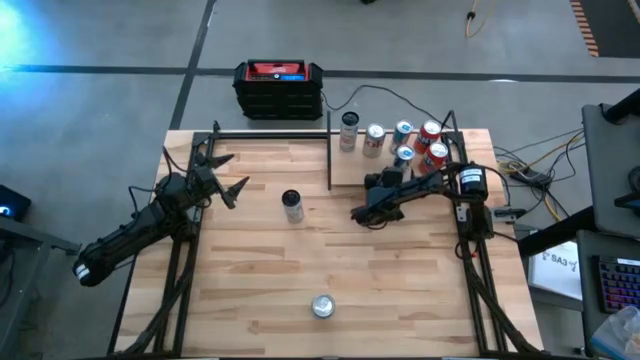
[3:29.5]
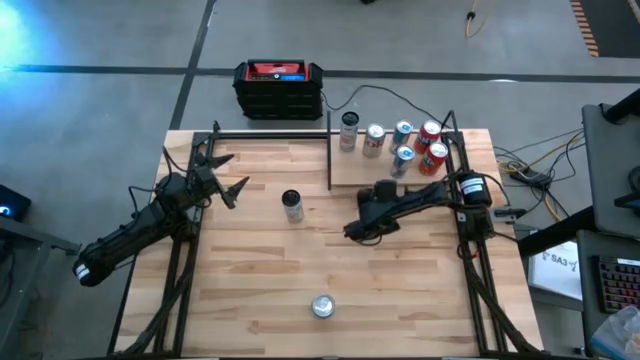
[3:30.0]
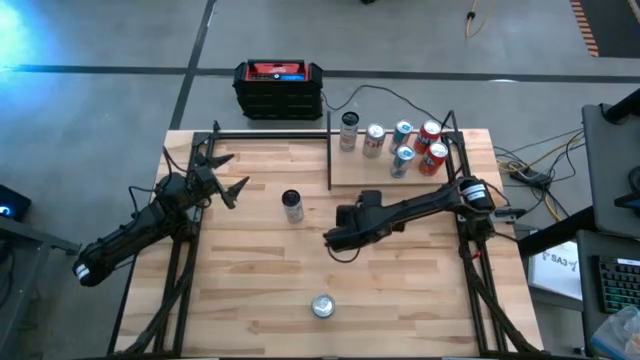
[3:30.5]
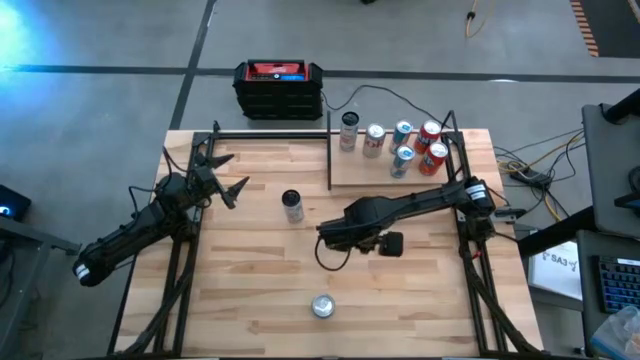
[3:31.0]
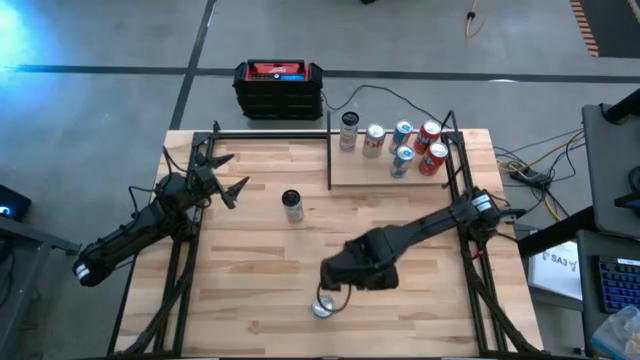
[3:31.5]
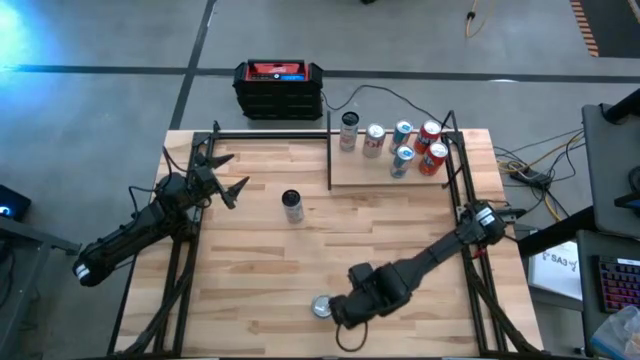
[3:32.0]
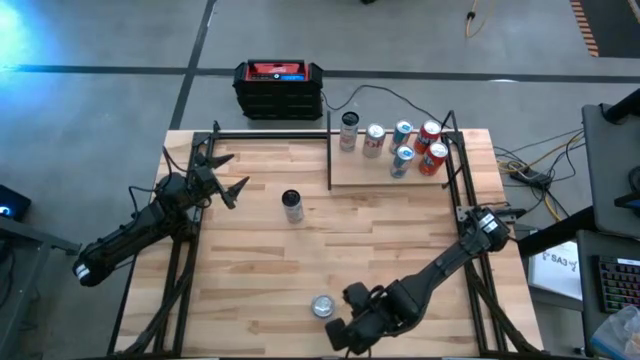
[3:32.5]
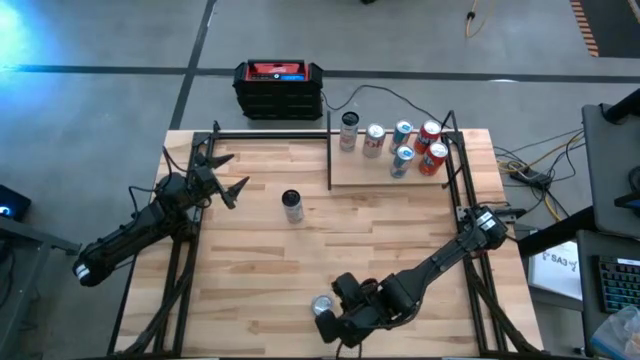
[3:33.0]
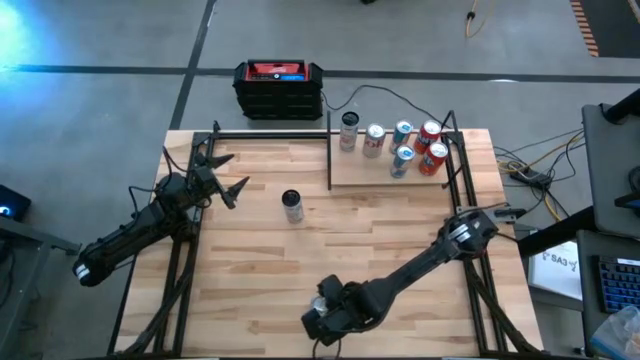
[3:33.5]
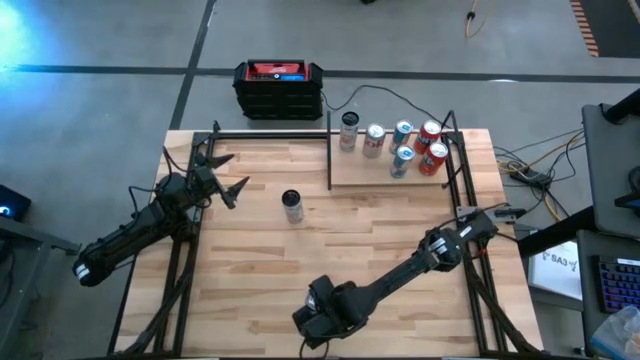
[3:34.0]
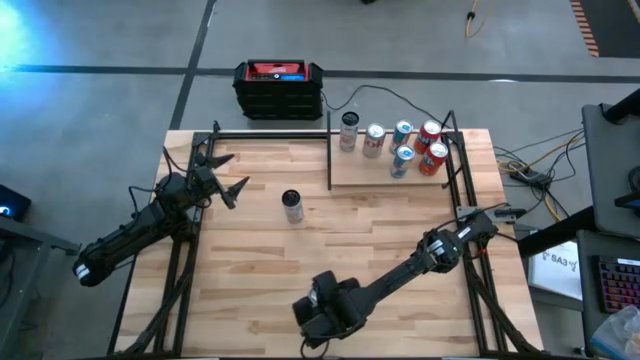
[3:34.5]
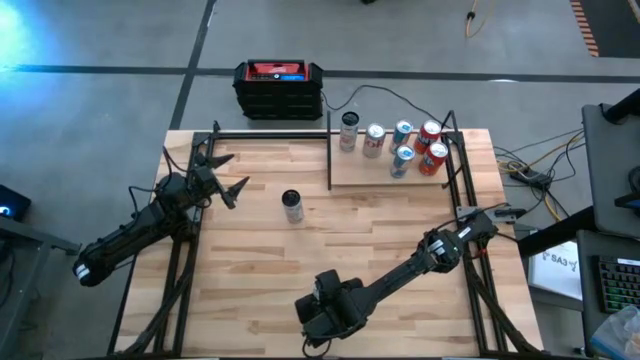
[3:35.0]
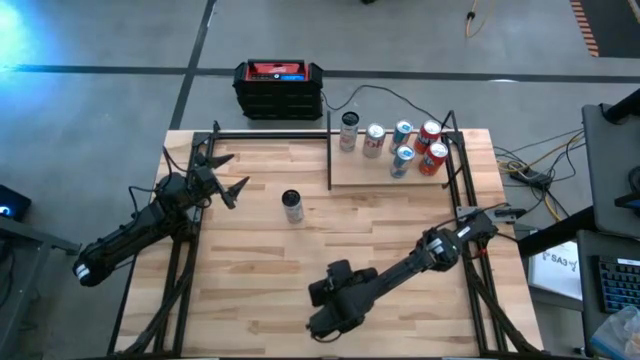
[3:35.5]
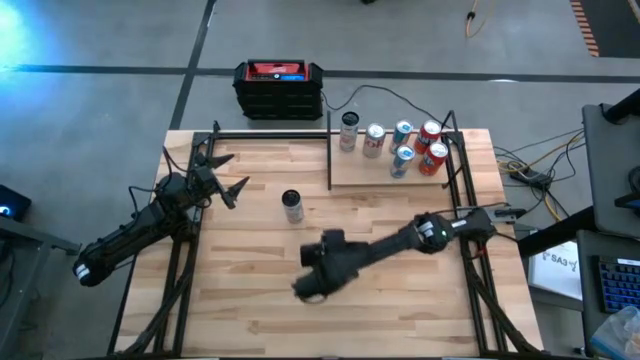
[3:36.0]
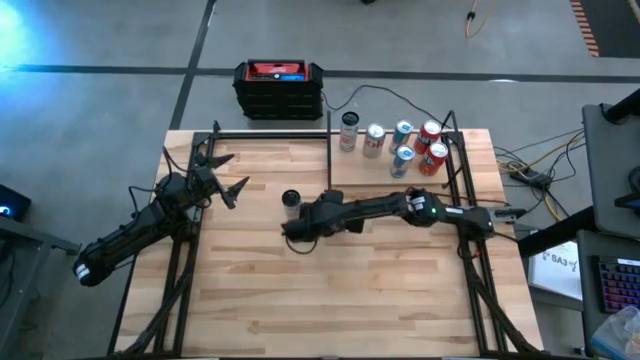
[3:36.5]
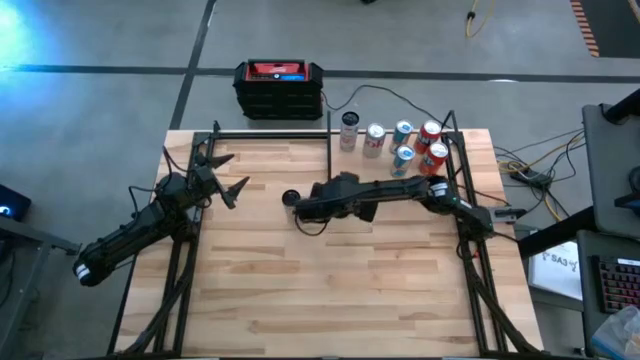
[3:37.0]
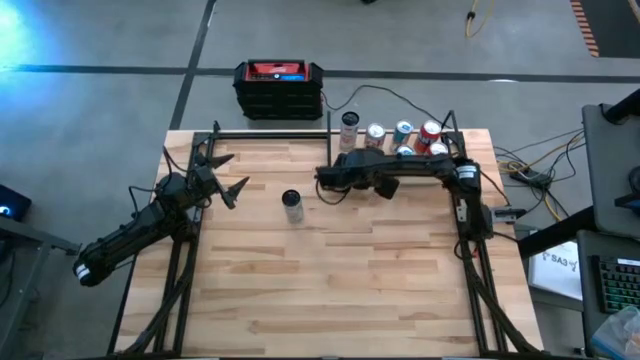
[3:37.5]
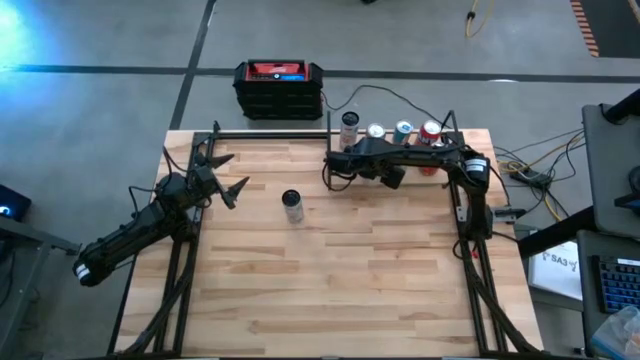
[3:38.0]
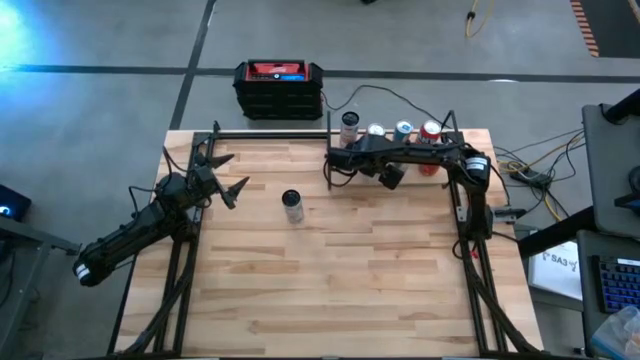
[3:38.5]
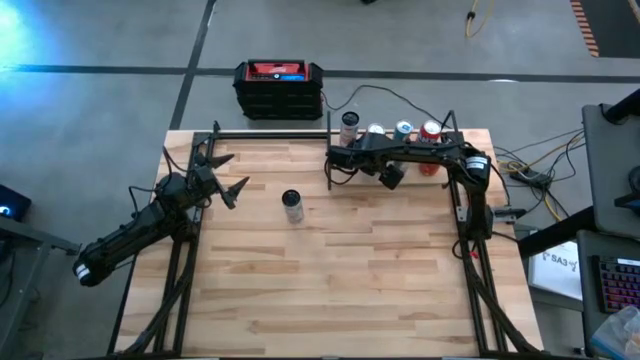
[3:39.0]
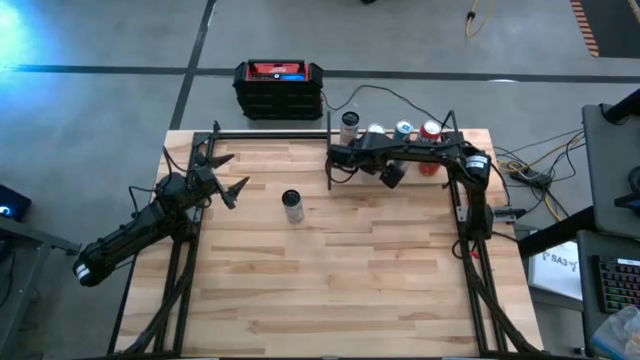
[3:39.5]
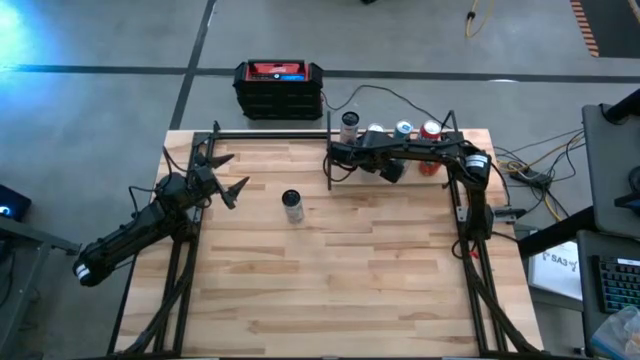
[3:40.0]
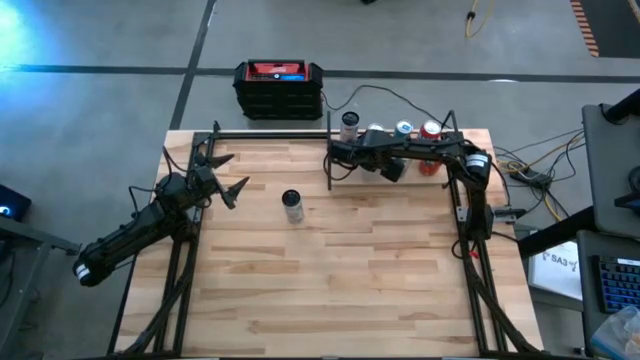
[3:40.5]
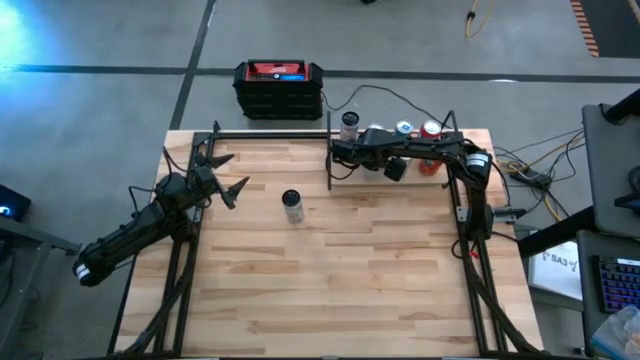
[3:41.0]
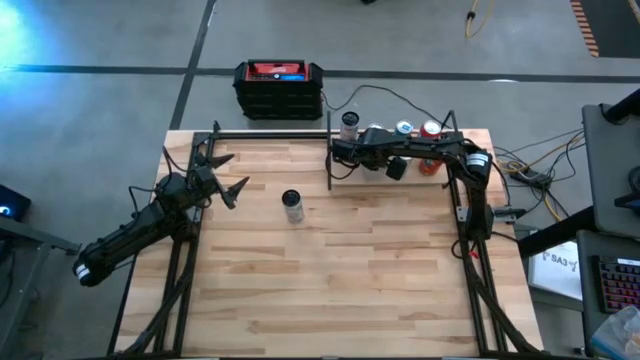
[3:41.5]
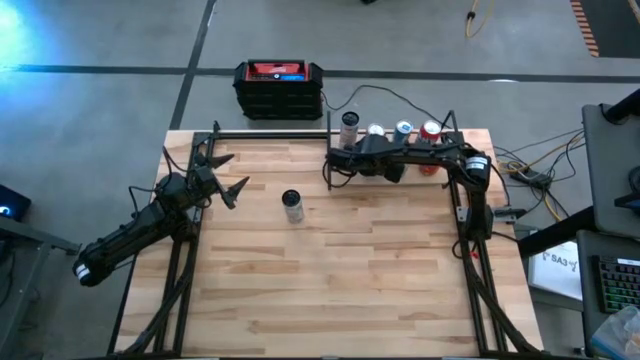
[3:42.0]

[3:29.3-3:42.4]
Task: Place canned beverage on shelf
Put the red silver soda can on the shelf aligned with the other silver soda can

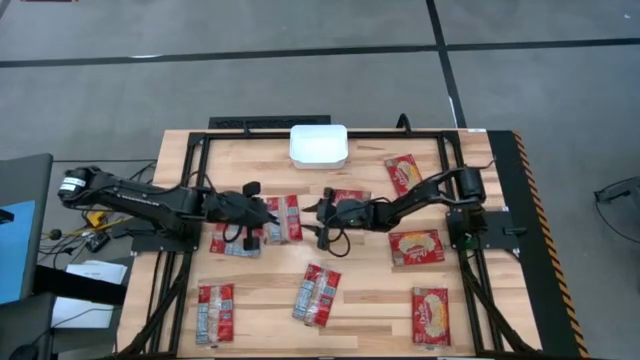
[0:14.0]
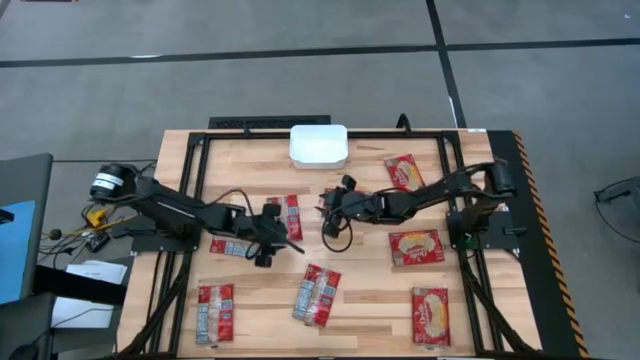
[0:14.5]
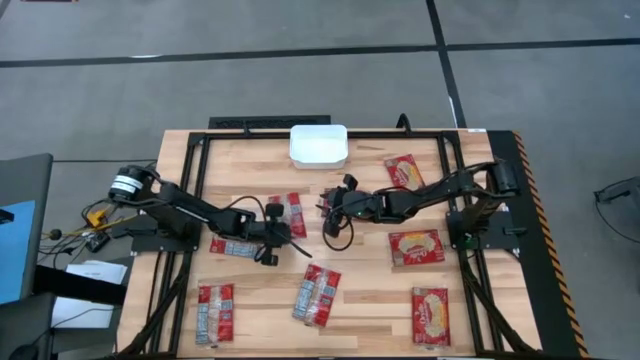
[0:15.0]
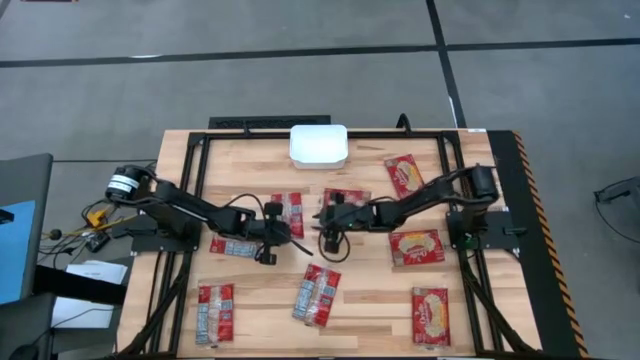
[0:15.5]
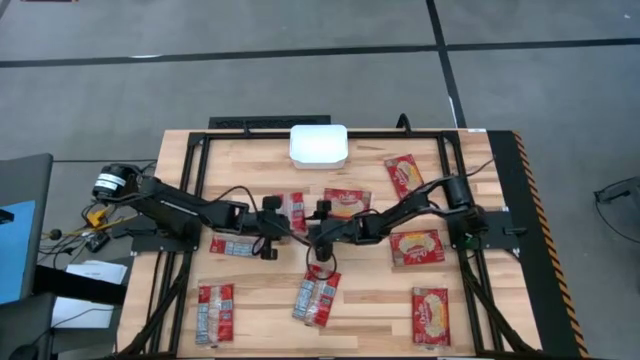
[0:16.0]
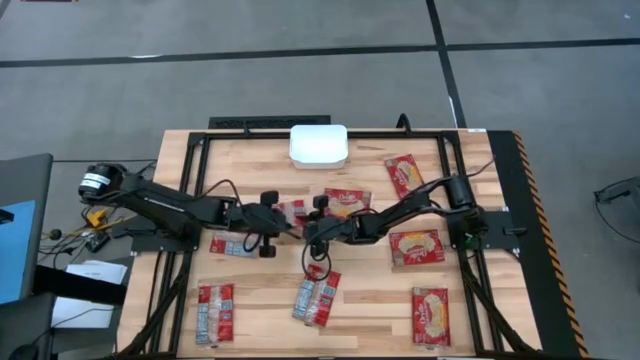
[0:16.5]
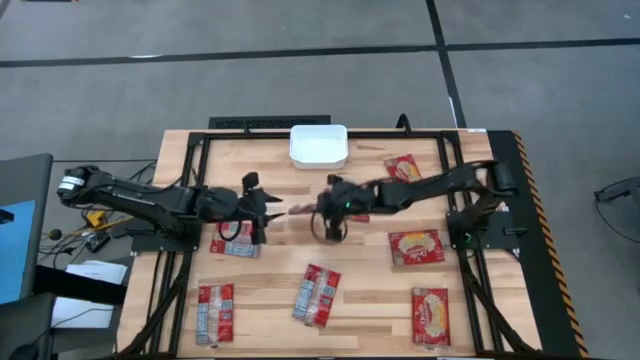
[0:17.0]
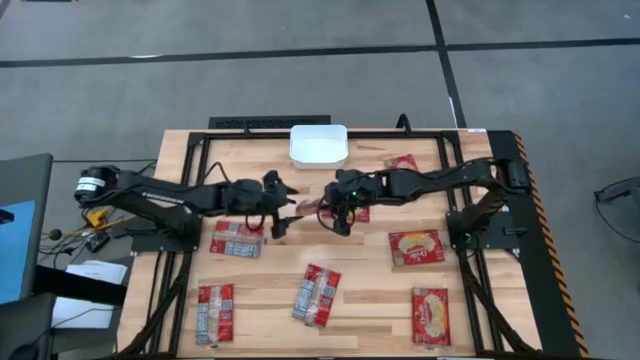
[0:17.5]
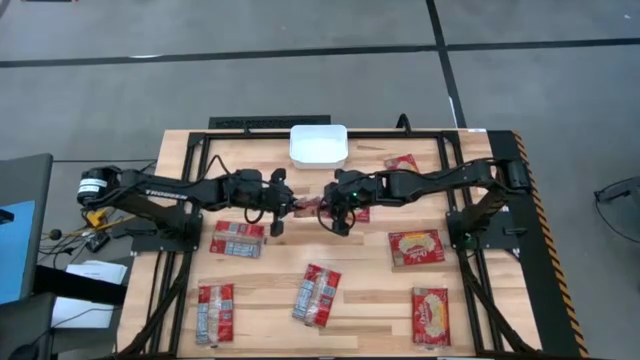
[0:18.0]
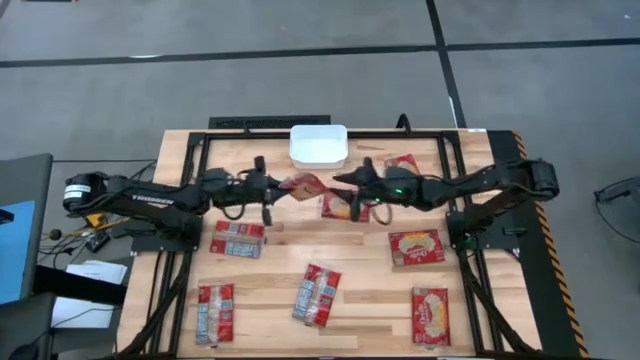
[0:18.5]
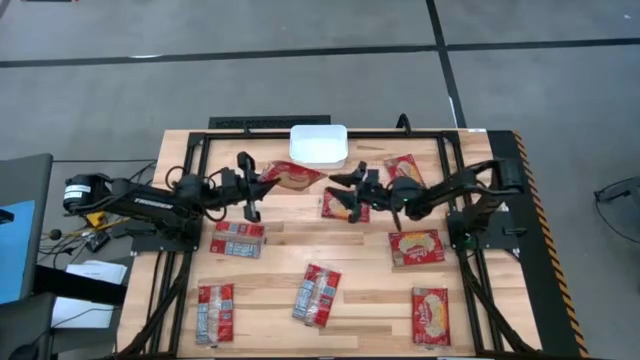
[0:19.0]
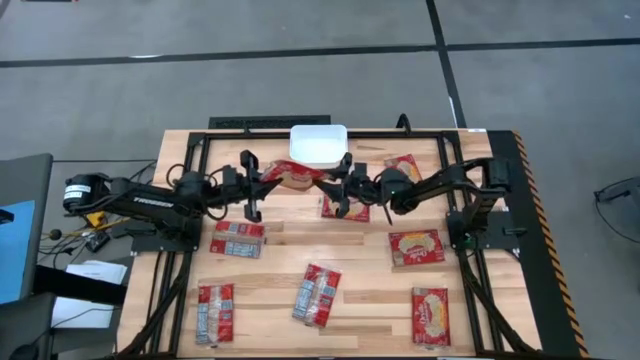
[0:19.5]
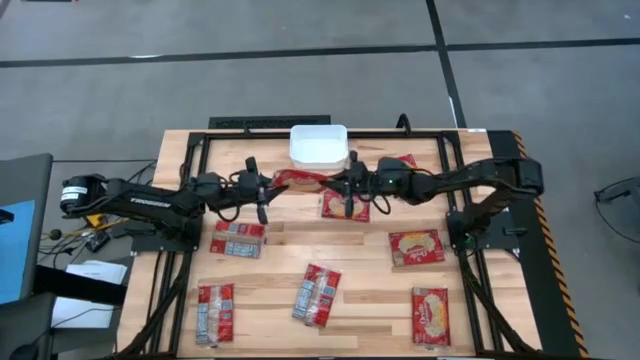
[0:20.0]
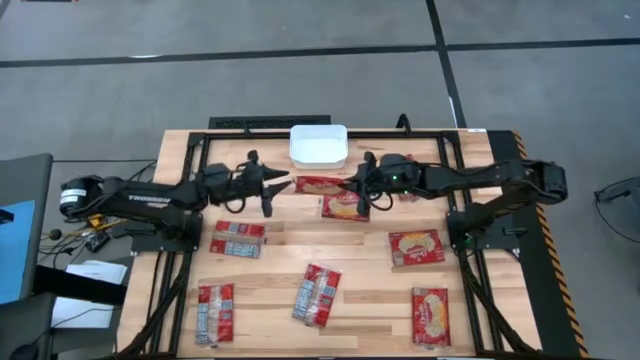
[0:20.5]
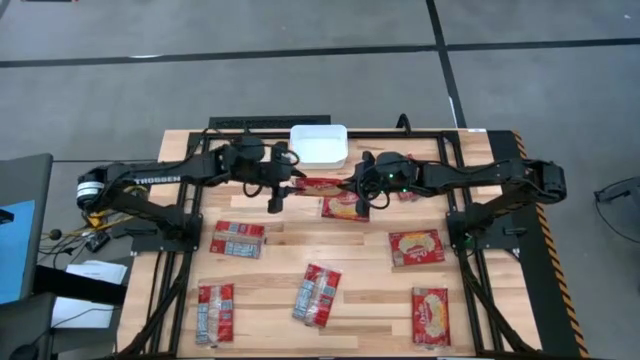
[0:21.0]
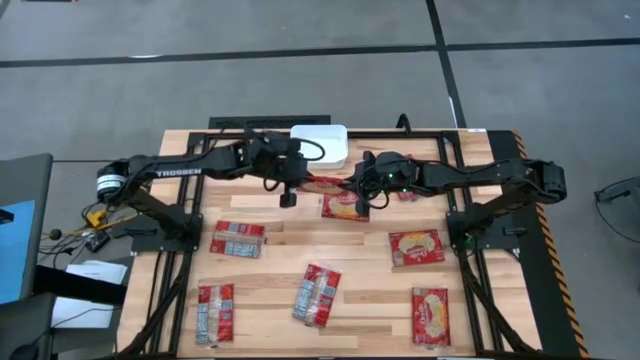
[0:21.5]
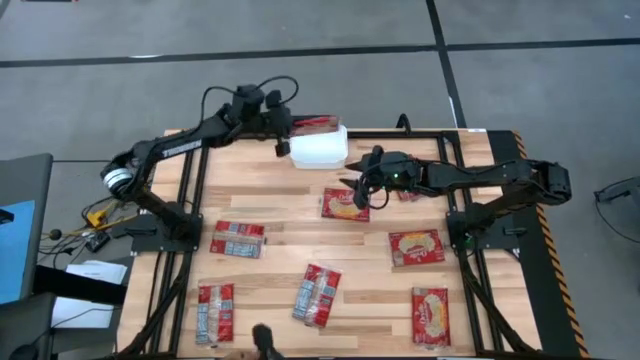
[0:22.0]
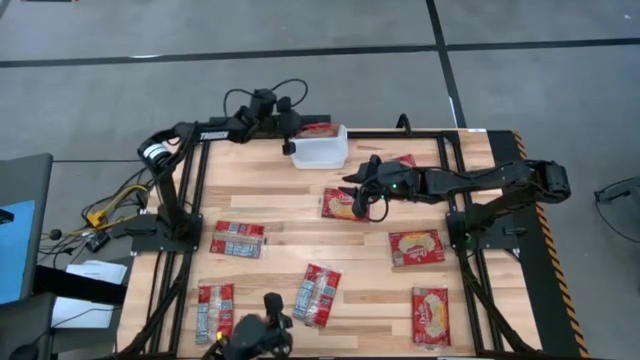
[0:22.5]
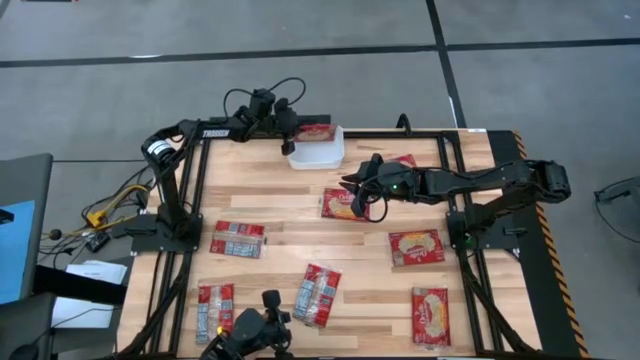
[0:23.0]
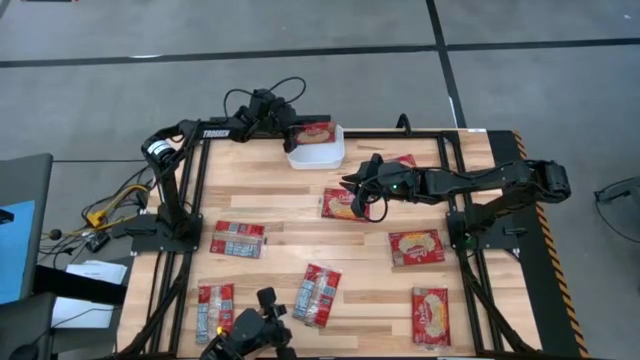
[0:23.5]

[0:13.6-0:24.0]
Task: Sort popcorn bags into baskets
Put the red popcorn bag into the white bin
